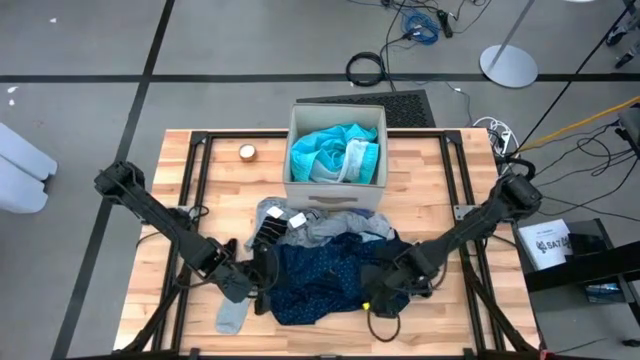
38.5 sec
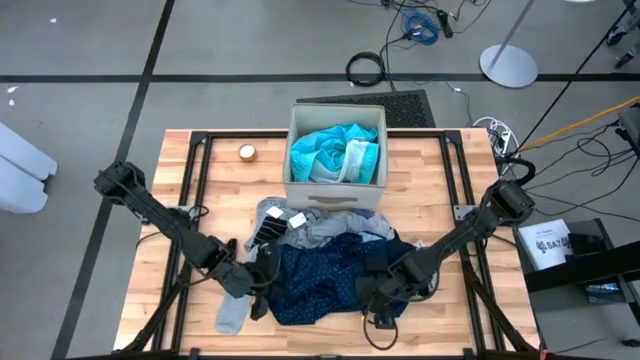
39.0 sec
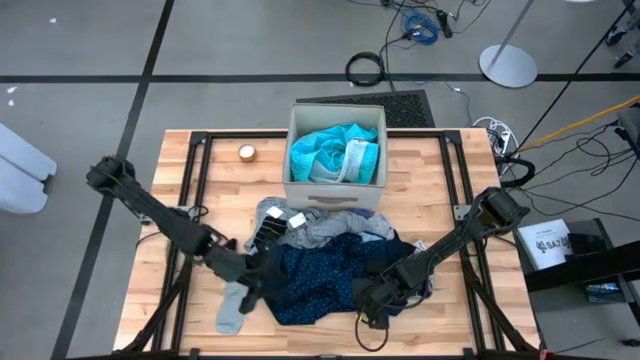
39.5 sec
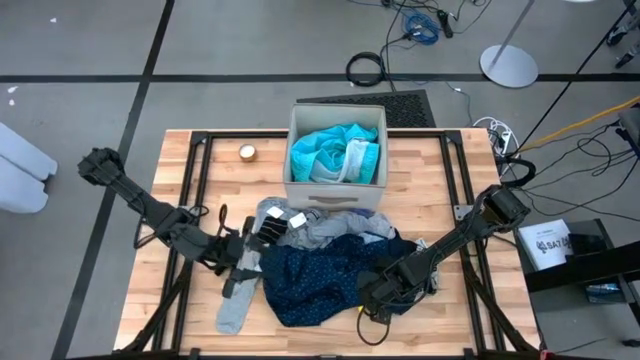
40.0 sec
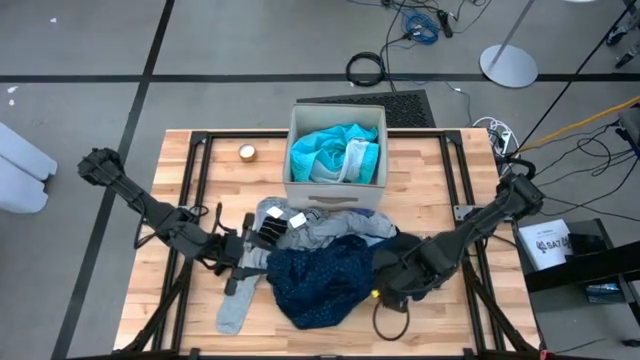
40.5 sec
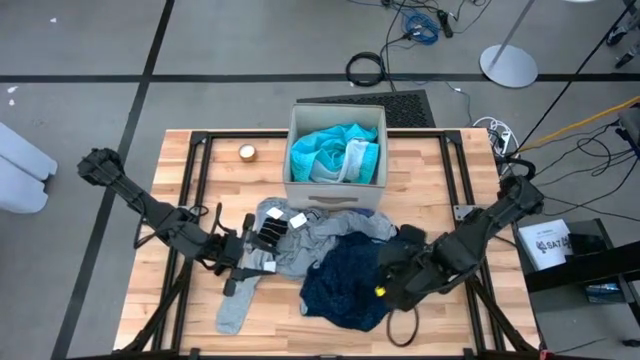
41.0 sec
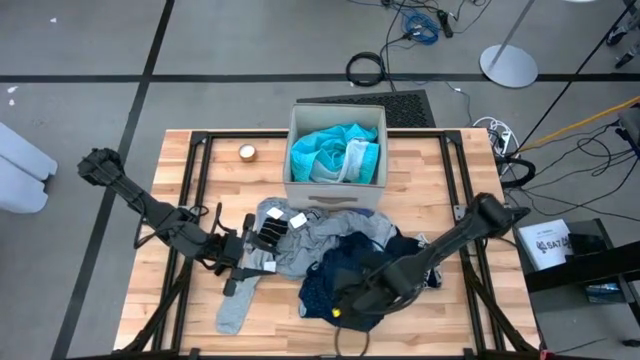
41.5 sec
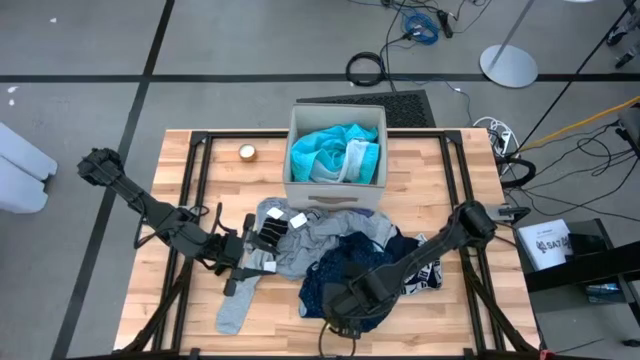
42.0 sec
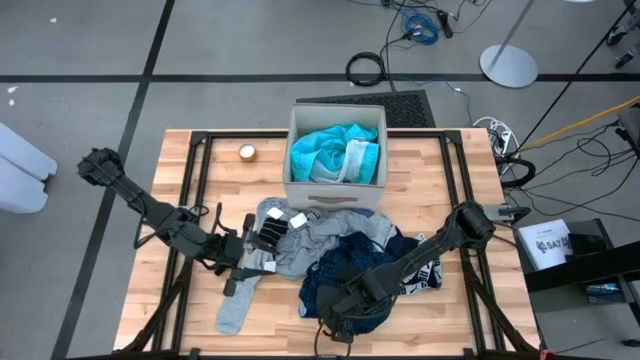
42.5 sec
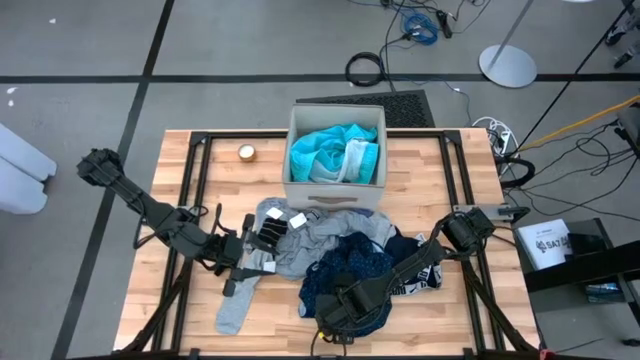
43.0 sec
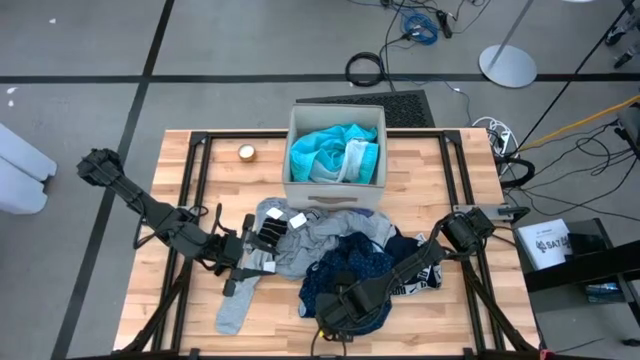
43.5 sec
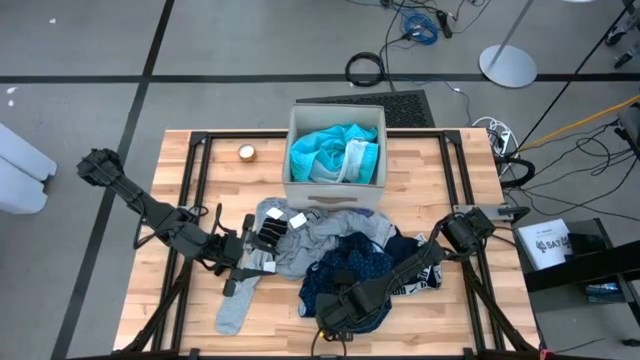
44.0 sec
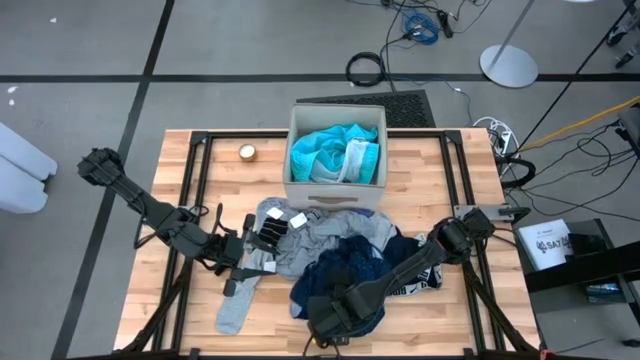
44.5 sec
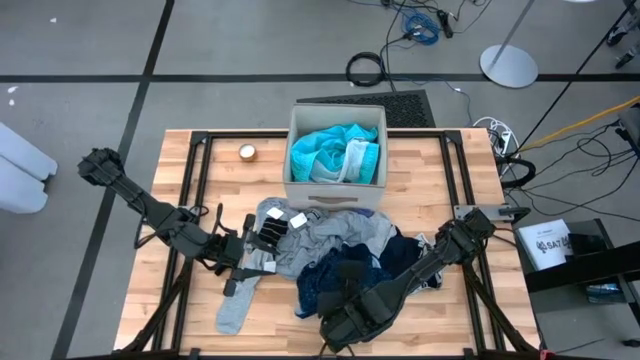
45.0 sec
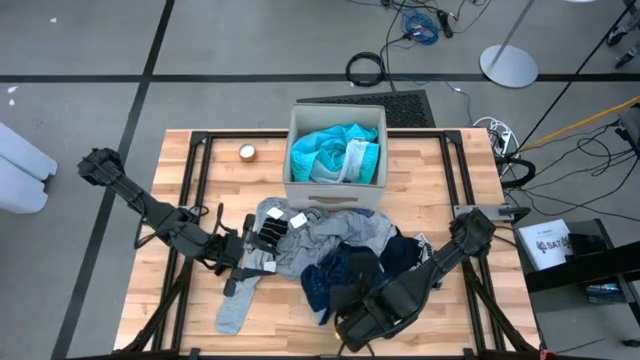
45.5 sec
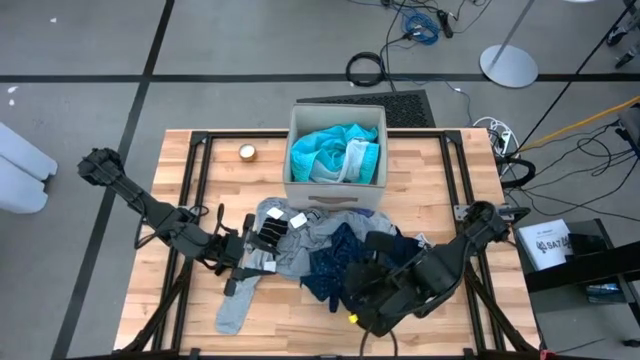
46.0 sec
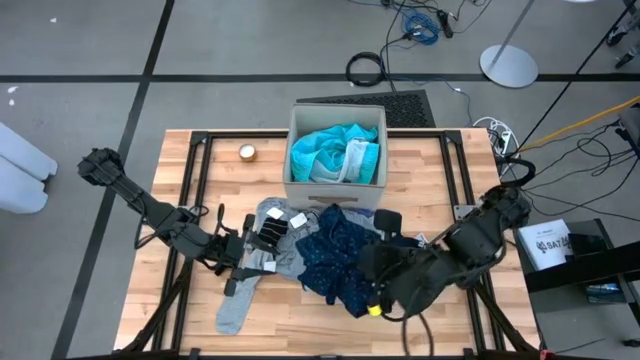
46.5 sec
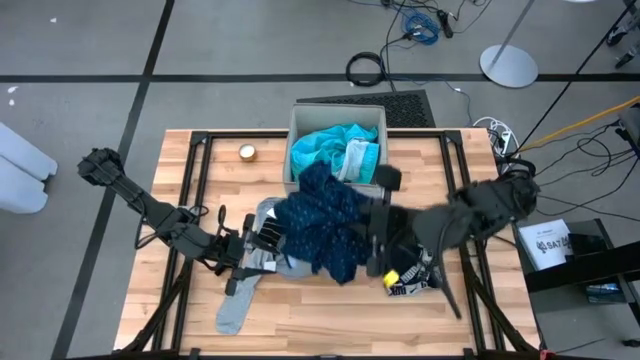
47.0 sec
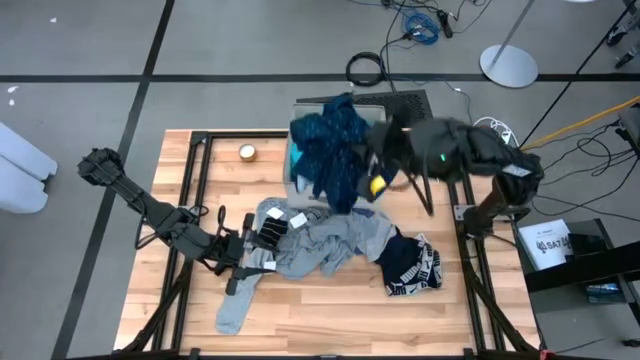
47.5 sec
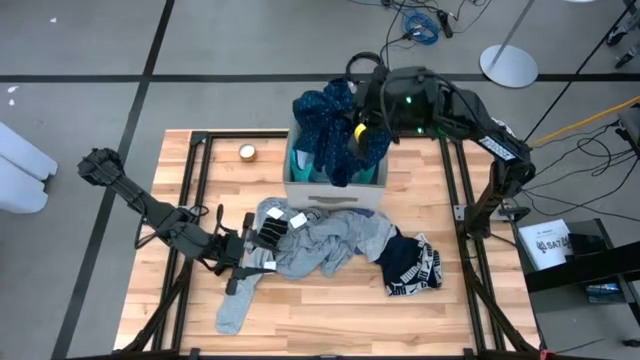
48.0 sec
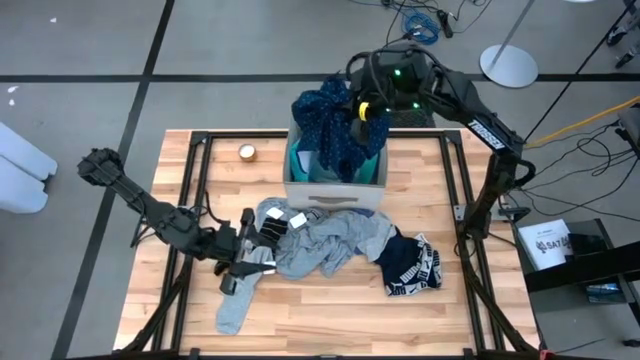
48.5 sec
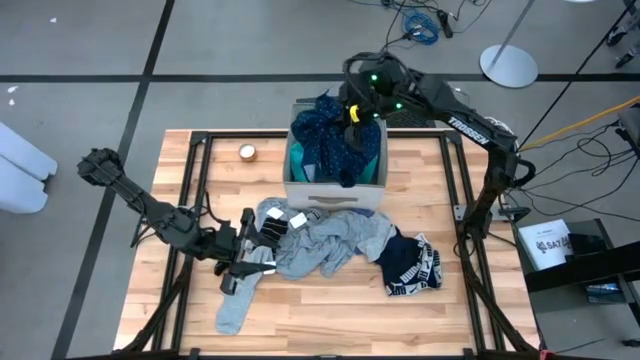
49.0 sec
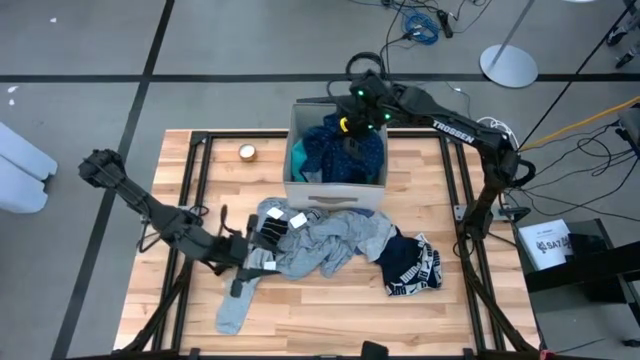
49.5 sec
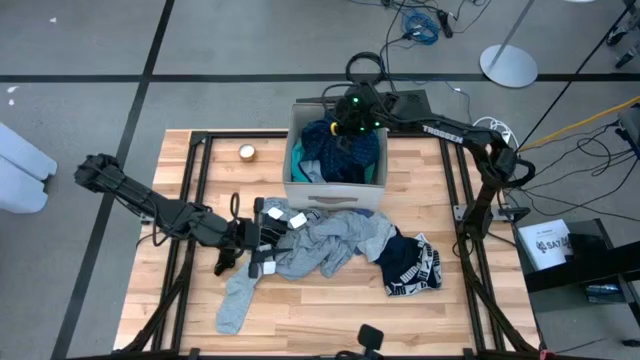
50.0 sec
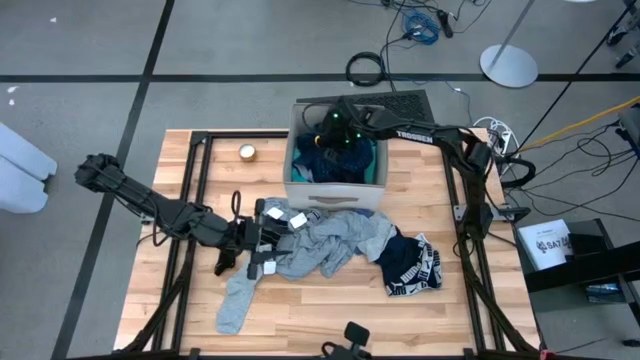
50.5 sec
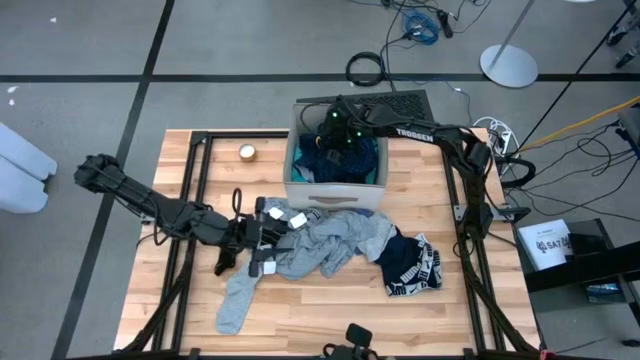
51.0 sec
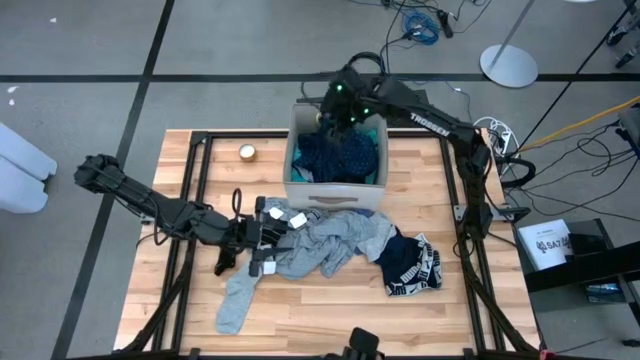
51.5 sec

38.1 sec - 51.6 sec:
Task: Sort clothes
Put the blue polo shirt into the laundry organizer

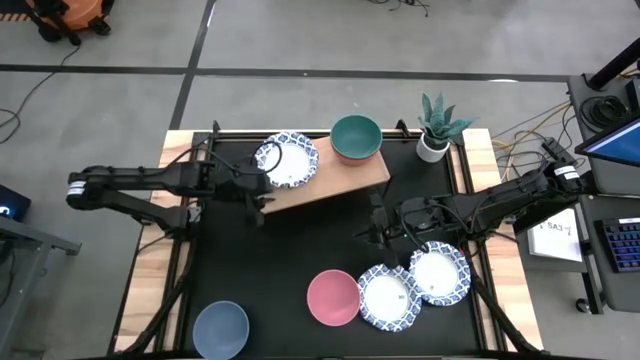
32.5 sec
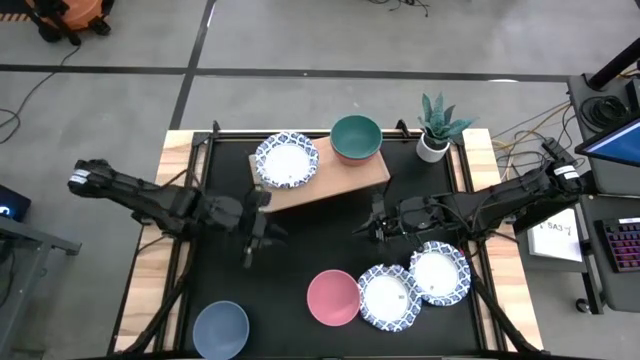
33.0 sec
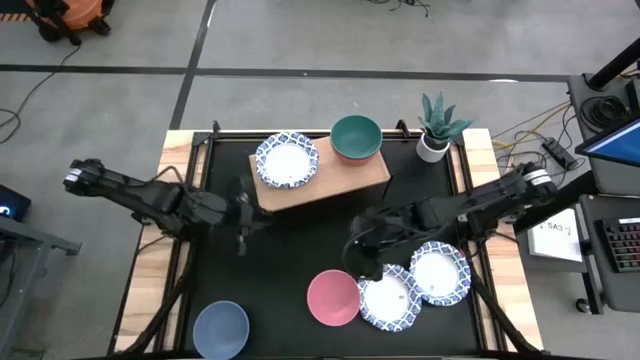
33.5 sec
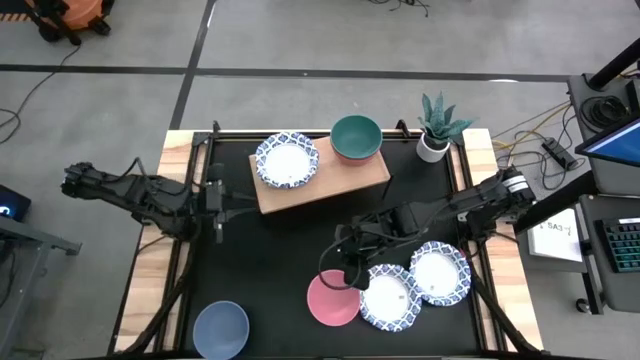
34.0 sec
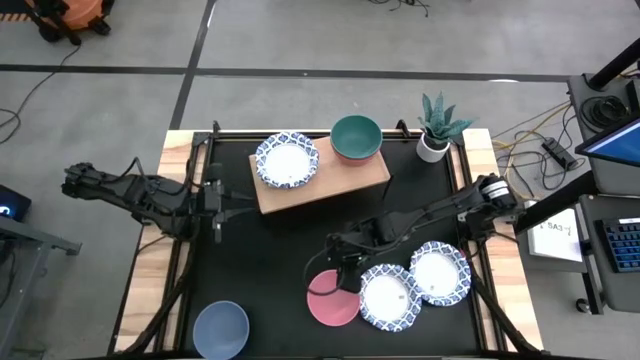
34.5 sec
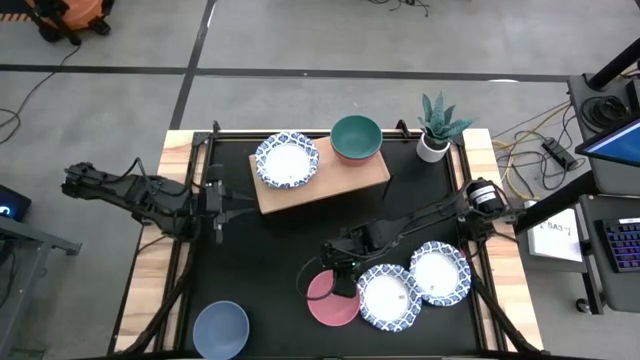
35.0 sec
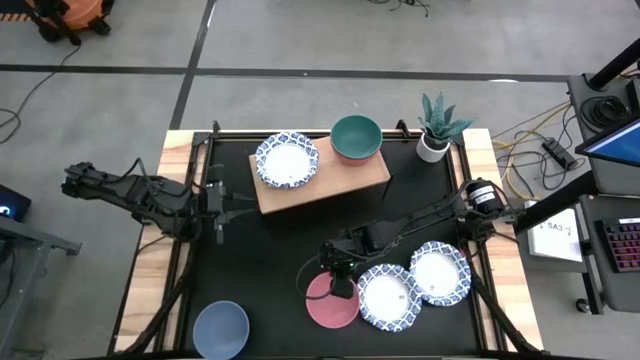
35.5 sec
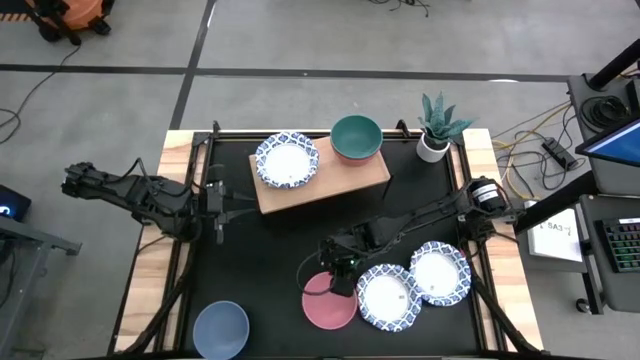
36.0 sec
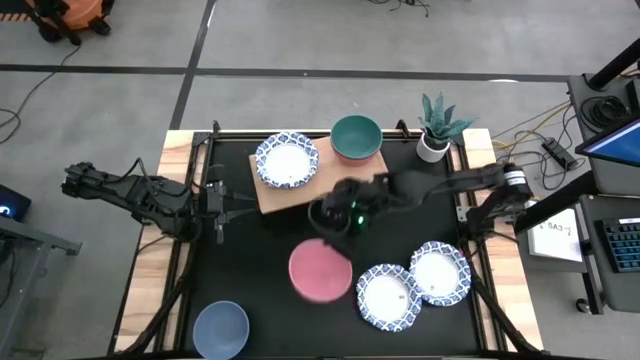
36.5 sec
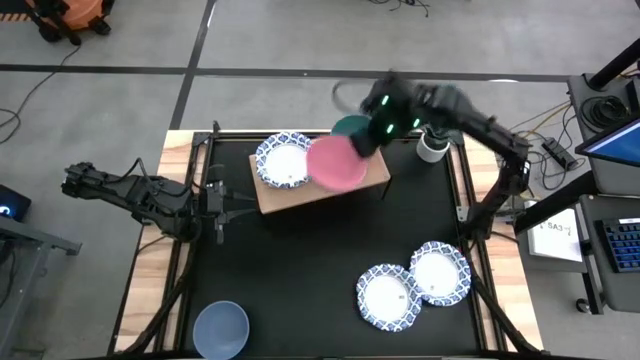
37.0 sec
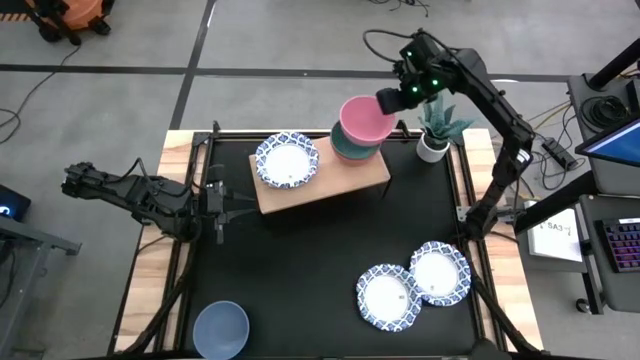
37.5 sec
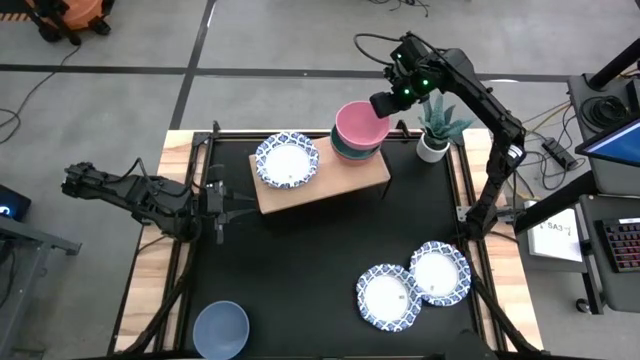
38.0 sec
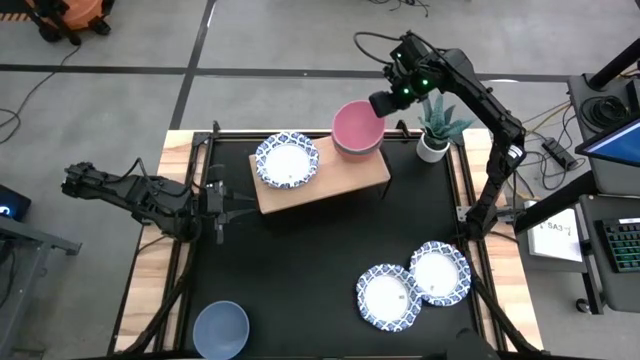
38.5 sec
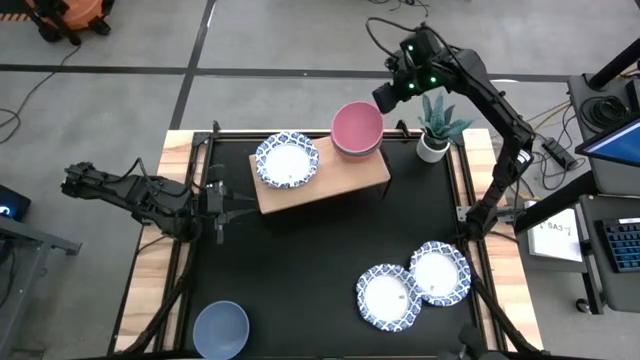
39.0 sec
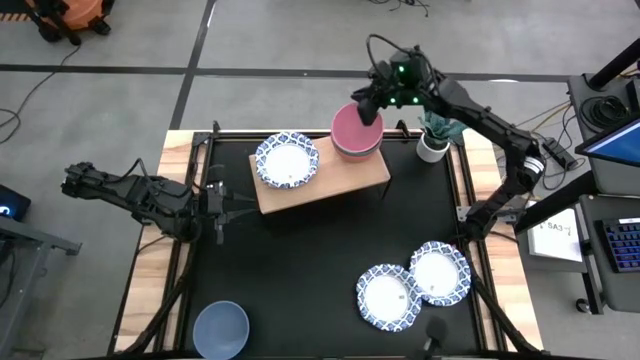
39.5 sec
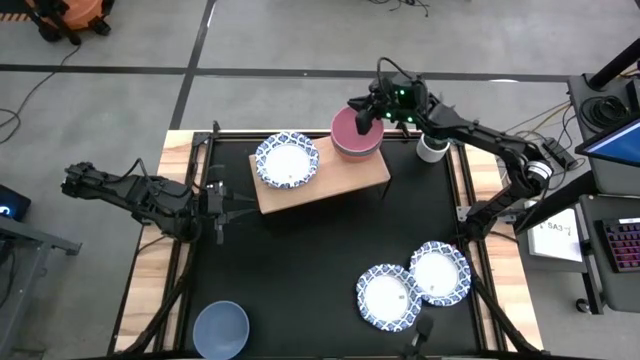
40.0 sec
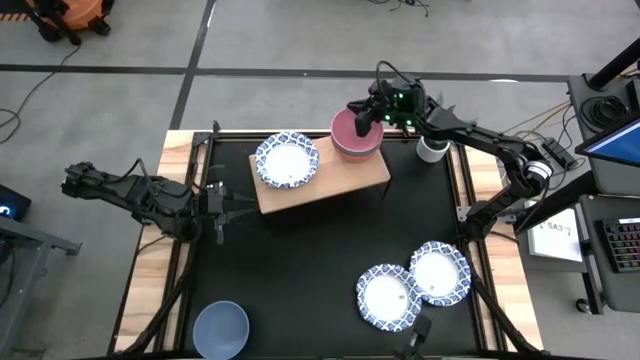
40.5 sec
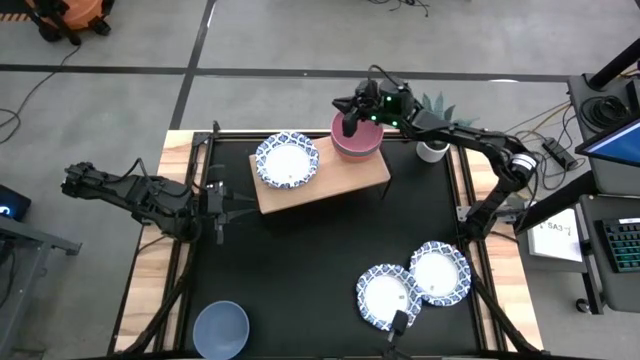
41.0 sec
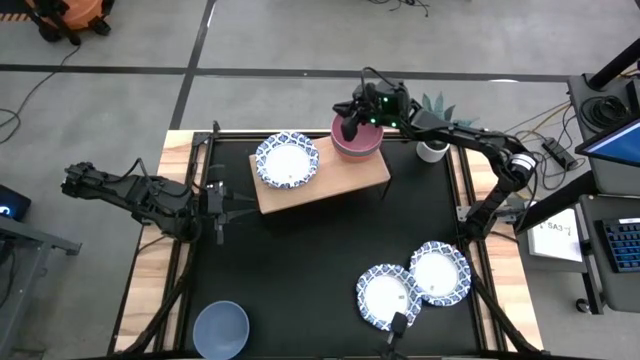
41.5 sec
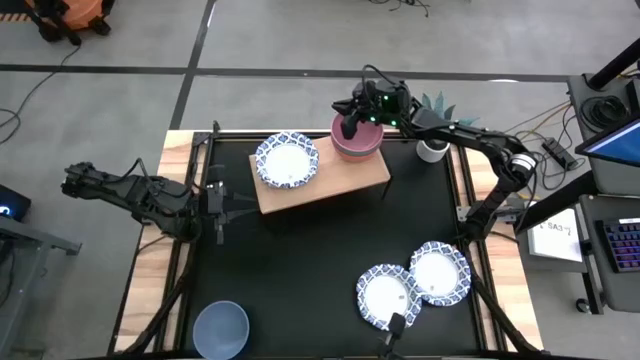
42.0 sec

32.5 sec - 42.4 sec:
Task: Place and stack bowls onto a shelf
Stack the pink bowl on top of the green bowl
